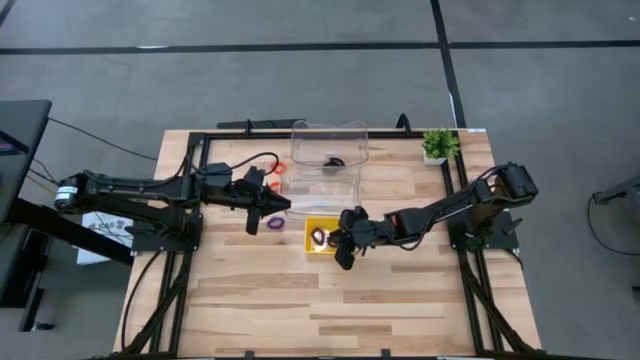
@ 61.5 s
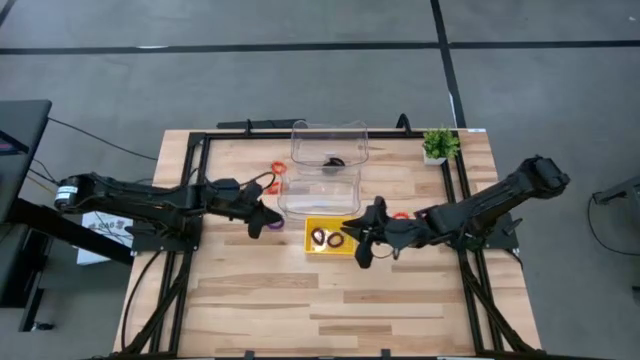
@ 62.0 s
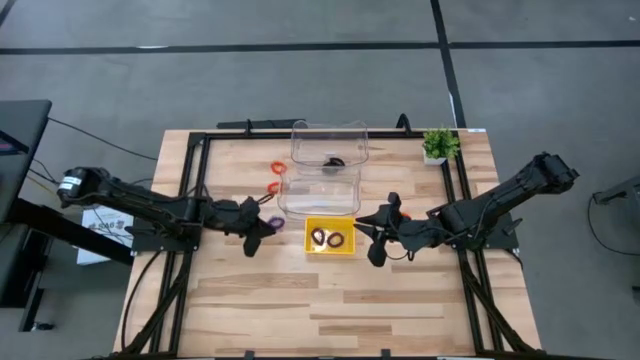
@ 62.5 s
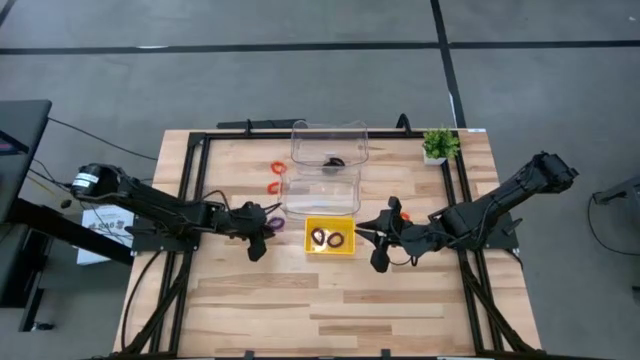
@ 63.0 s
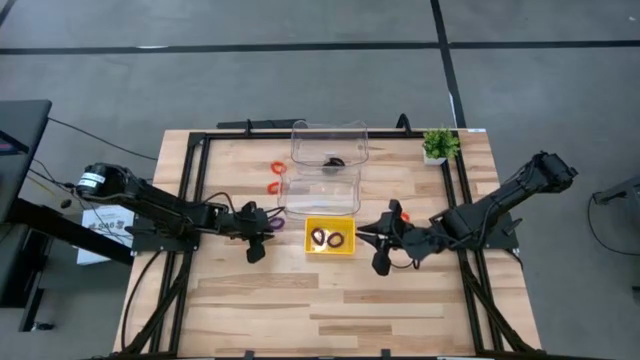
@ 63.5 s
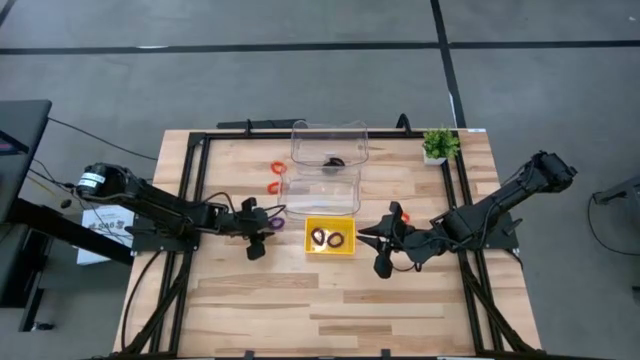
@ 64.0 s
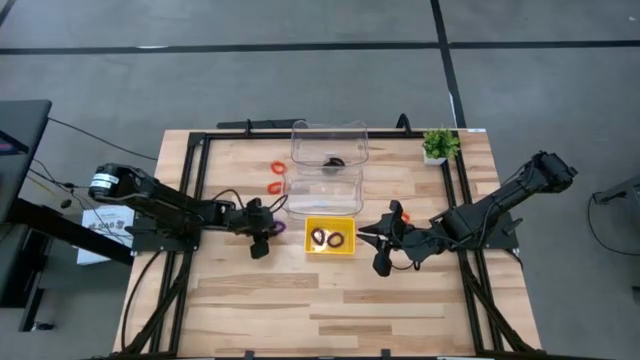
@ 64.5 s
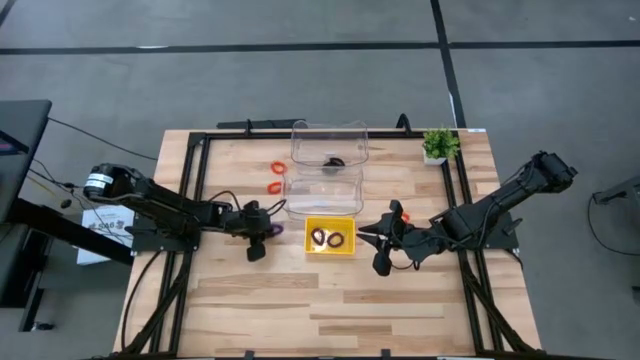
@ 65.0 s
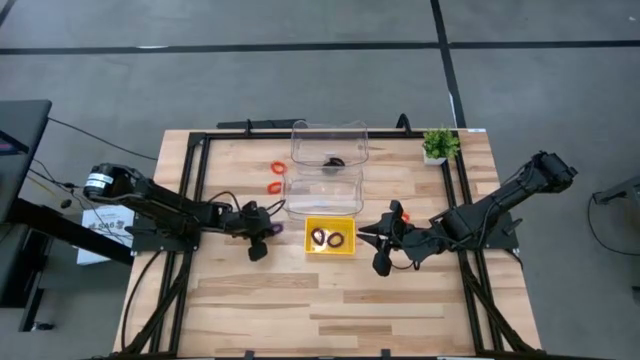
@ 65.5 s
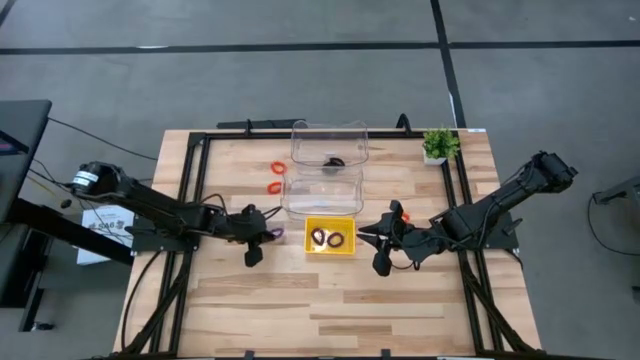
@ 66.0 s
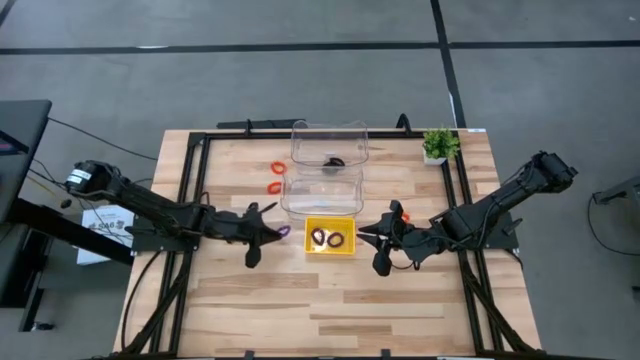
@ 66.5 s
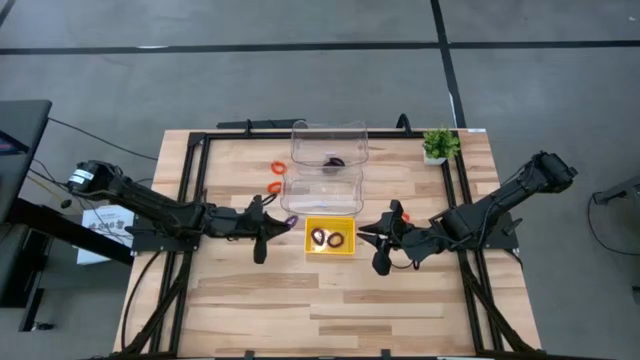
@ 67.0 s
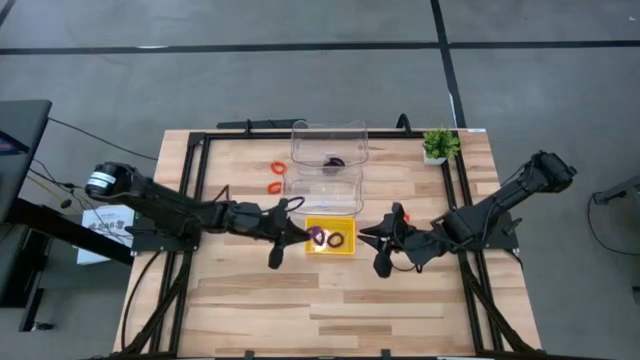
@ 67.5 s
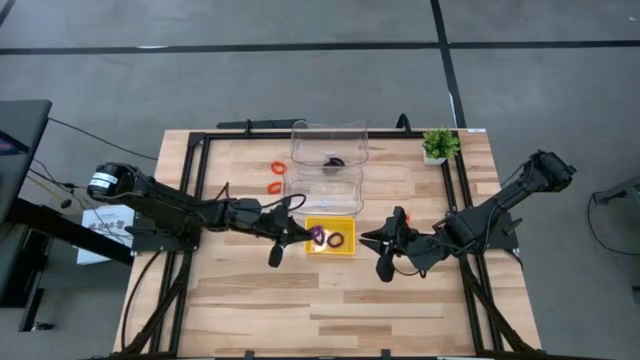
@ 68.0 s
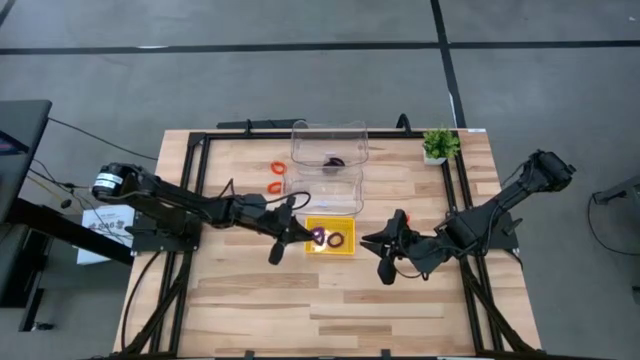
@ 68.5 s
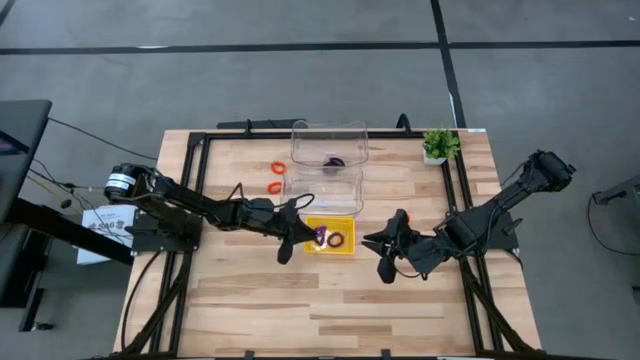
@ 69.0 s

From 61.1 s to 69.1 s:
Task: Sort spring keychains
Put the purple spring keychain into the yellow bin

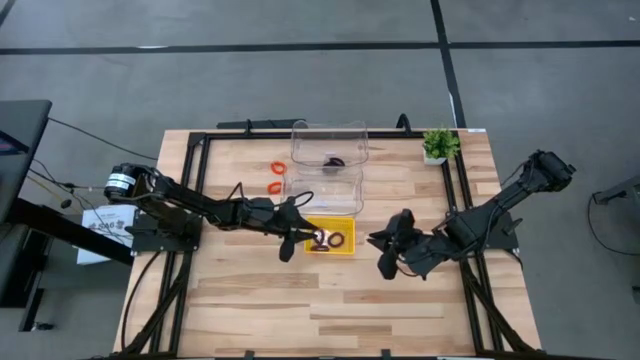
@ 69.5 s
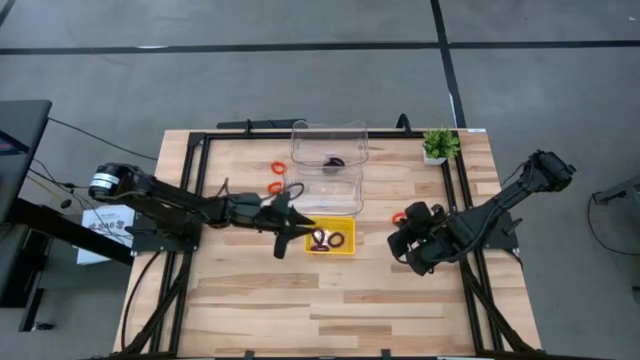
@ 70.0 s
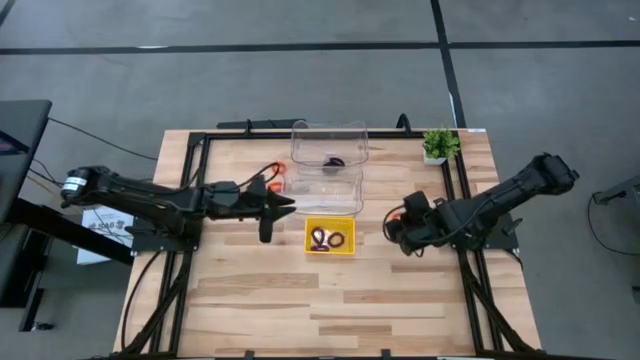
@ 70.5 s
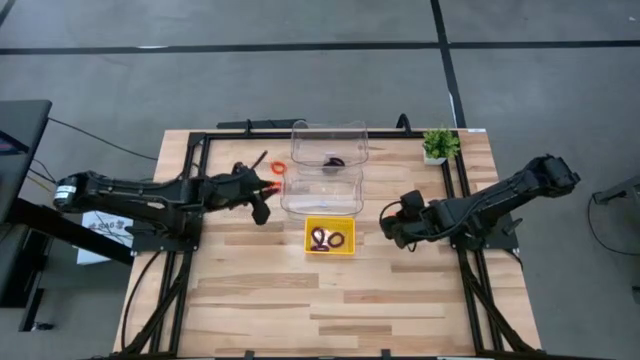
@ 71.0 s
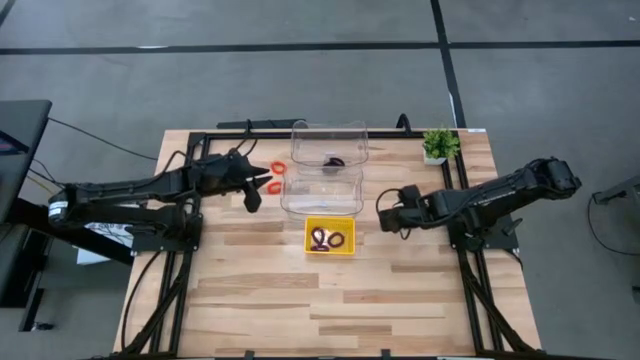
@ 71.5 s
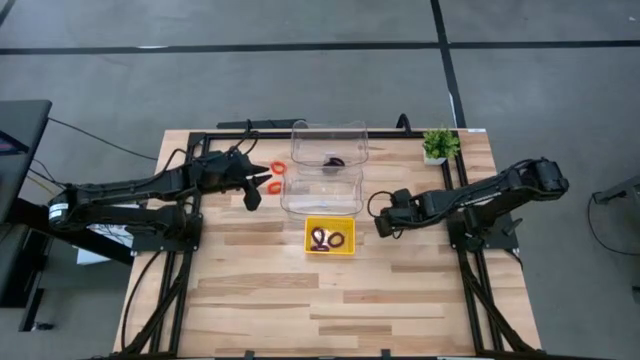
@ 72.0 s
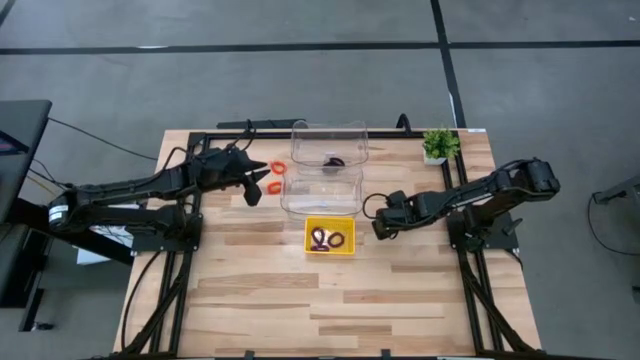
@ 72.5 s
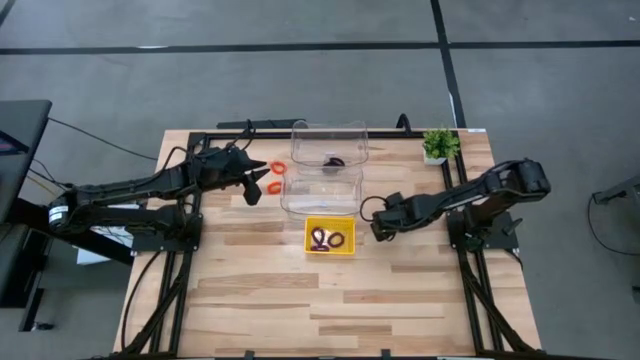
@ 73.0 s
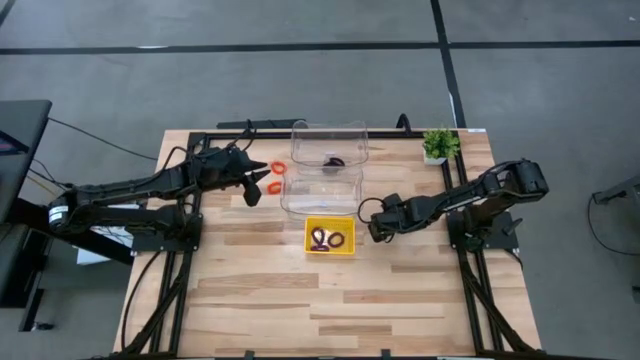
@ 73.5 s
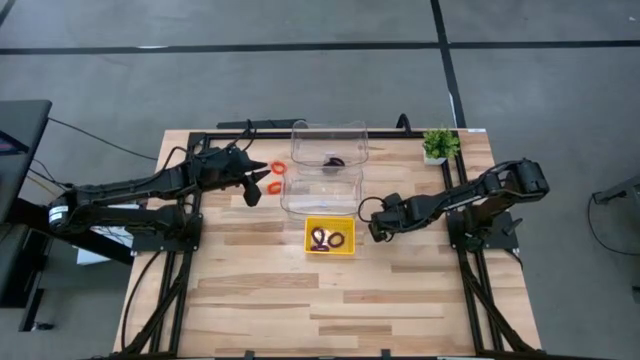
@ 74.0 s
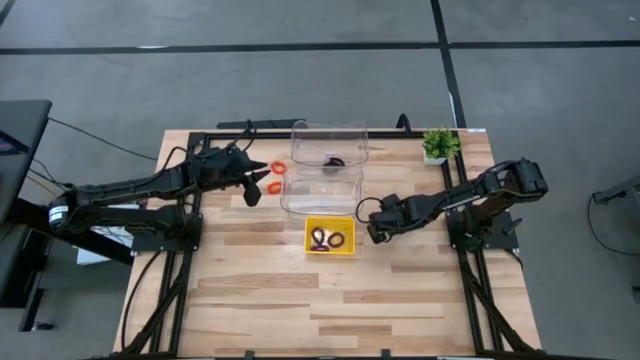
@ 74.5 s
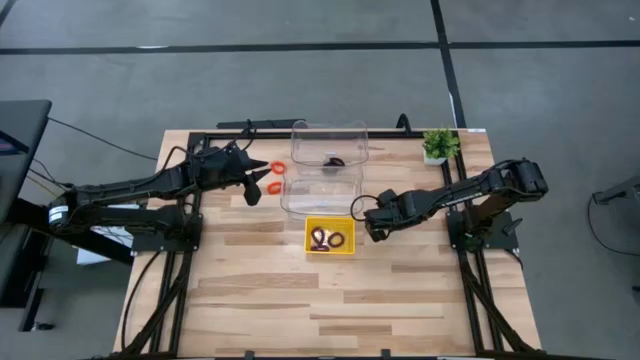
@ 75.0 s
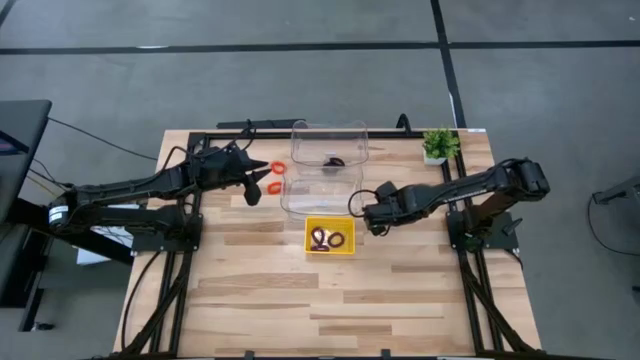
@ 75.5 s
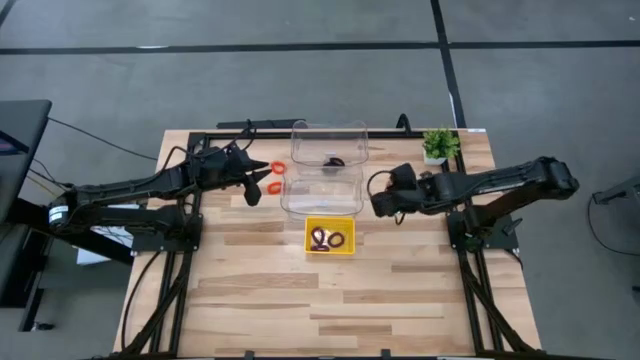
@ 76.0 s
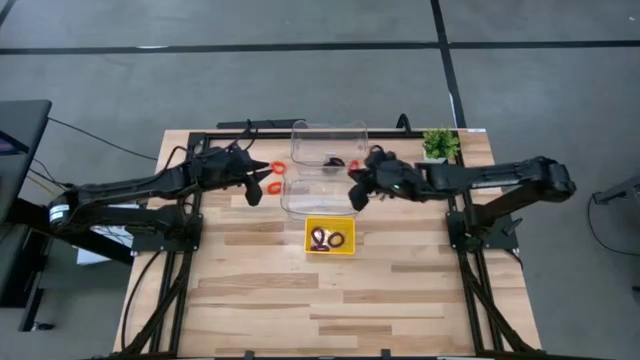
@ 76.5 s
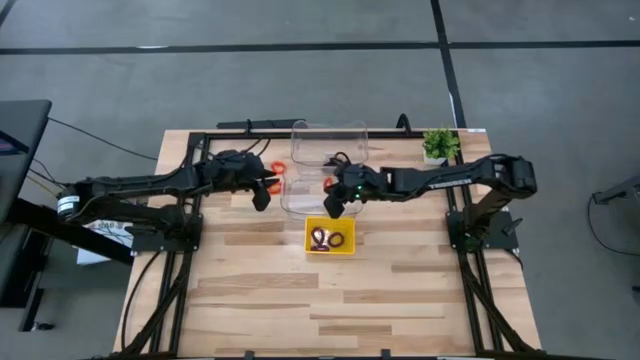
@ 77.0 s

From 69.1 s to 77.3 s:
Put the bottom right orange spring keychain into the bottom transparent bin

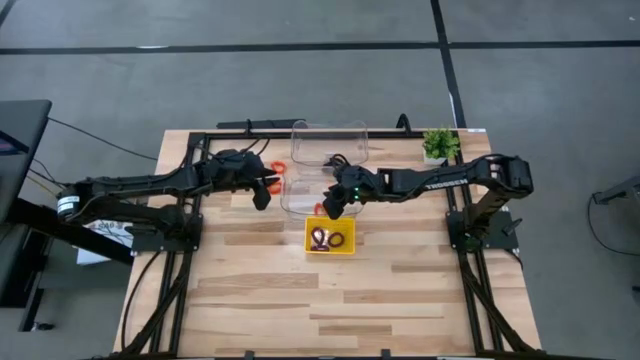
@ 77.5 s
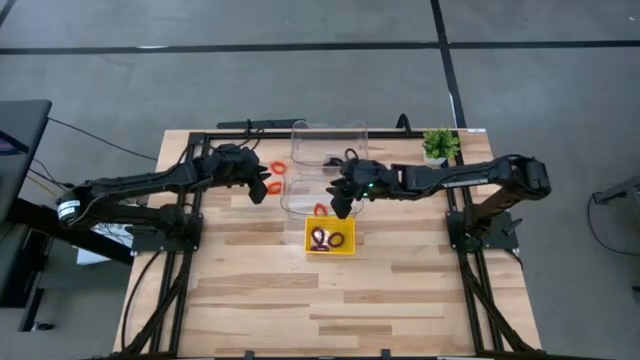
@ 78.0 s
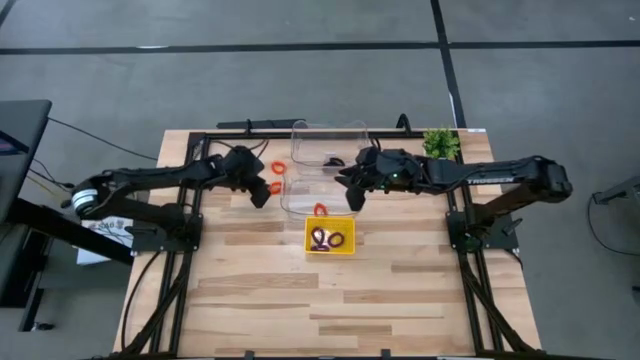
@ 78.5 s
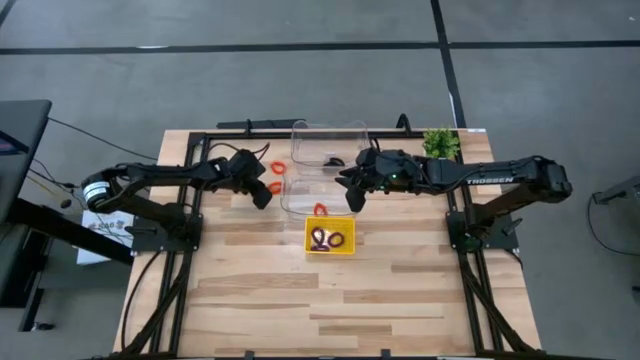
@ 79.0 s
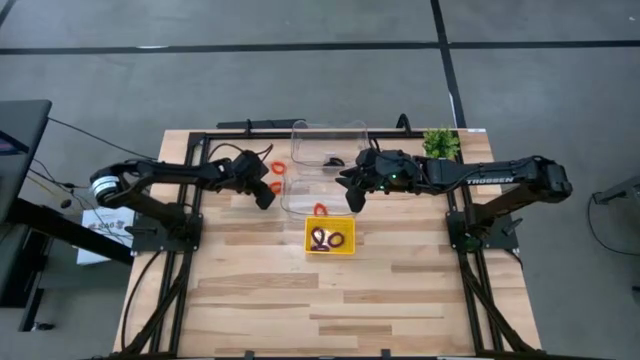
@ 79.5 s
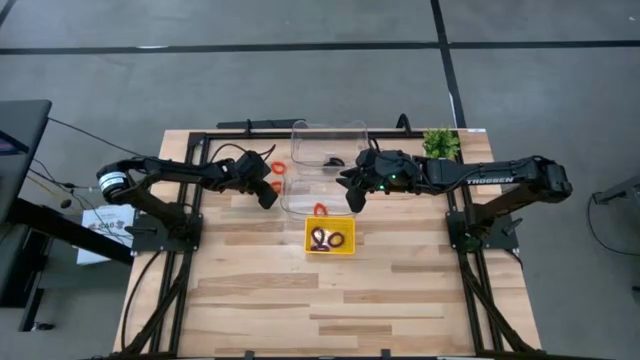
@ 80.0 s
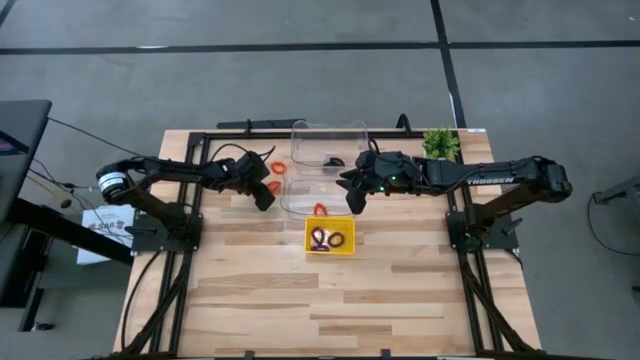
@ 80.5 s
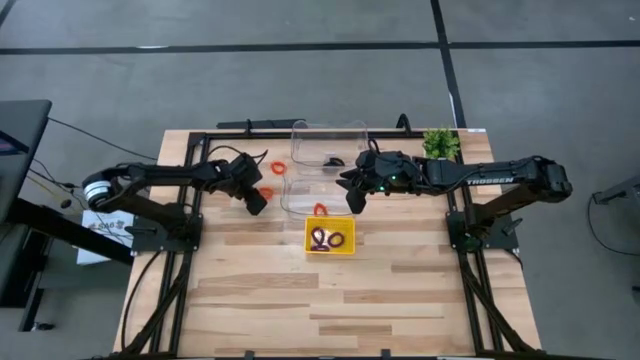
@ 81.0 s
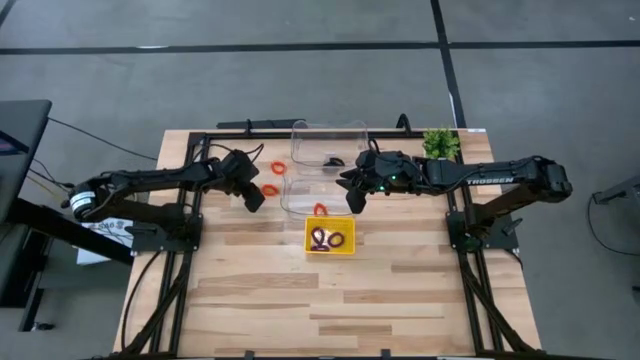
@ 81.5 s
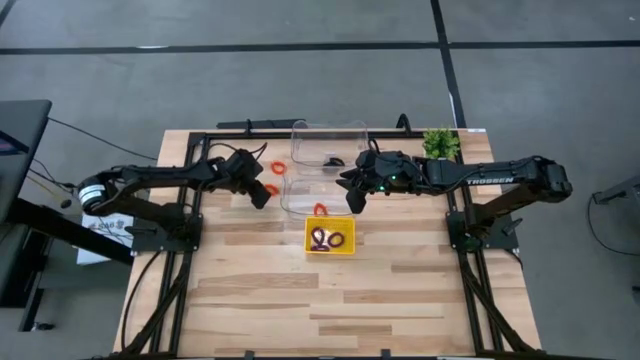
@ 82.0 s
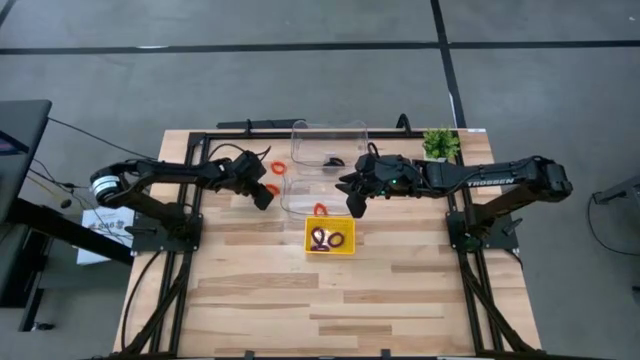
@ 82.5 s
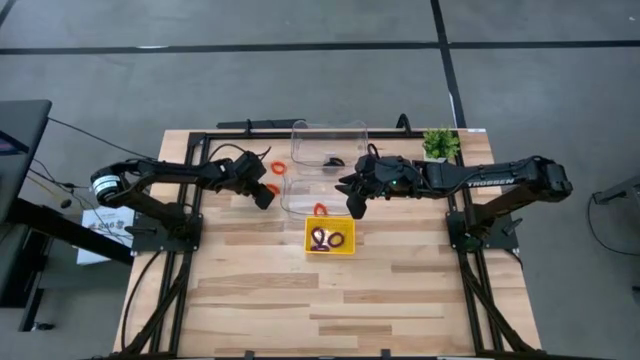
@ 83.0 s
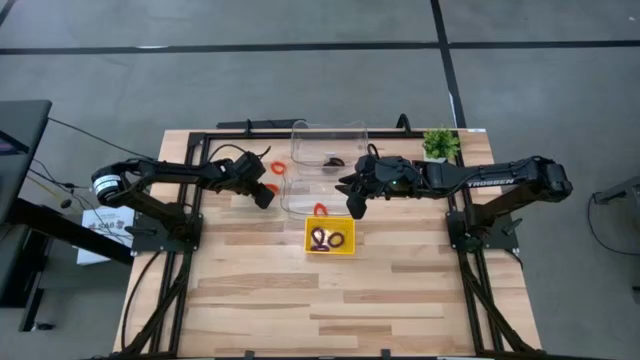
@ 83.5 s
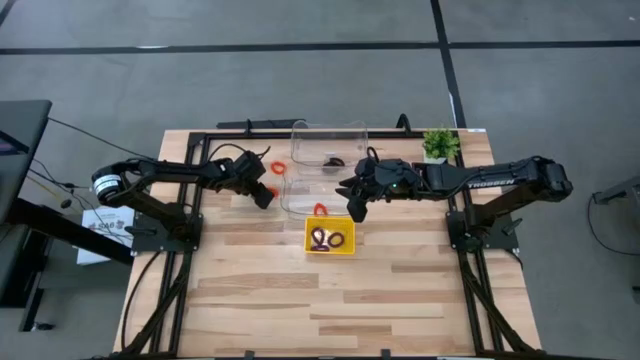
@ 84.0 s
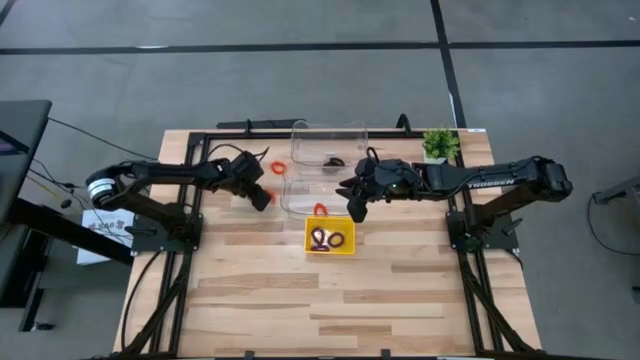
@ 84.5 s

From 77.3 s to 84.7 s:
Put the middle left orange spring keychain into the bottom transparent bin
